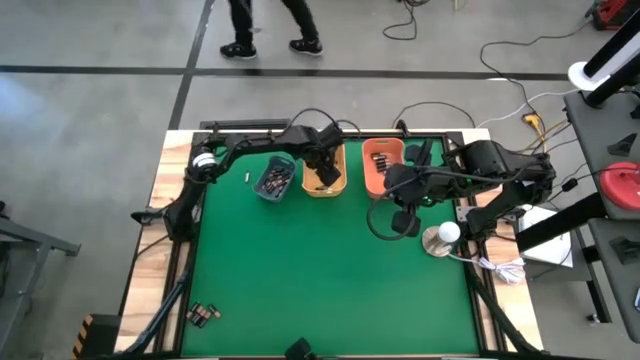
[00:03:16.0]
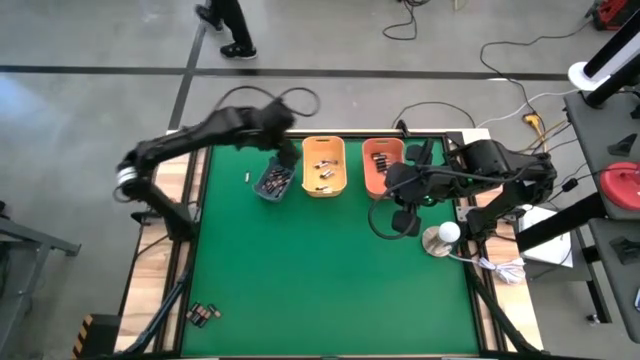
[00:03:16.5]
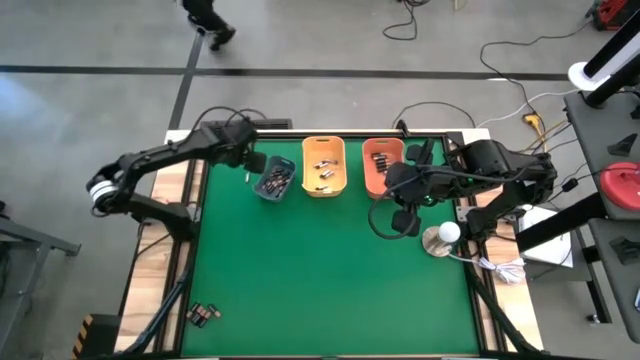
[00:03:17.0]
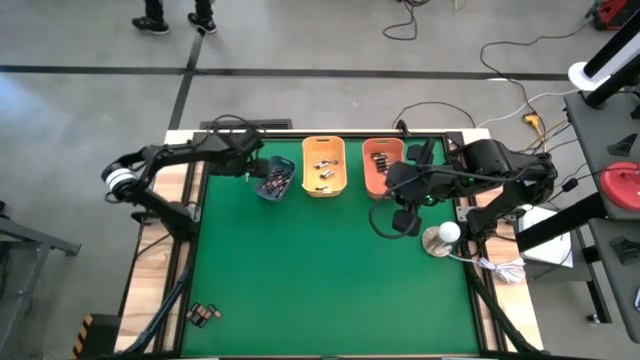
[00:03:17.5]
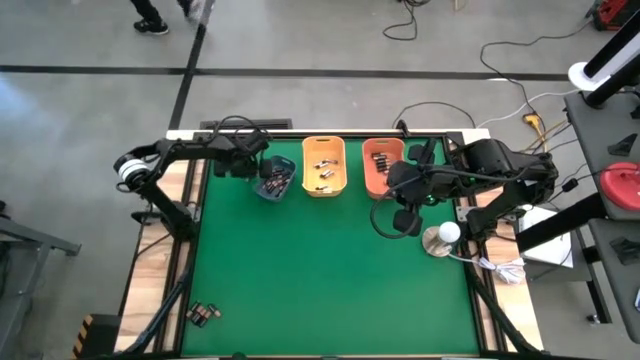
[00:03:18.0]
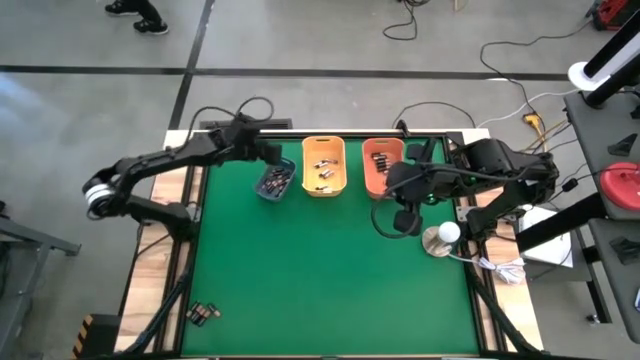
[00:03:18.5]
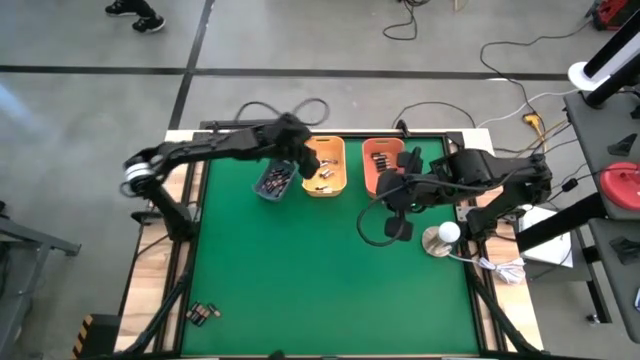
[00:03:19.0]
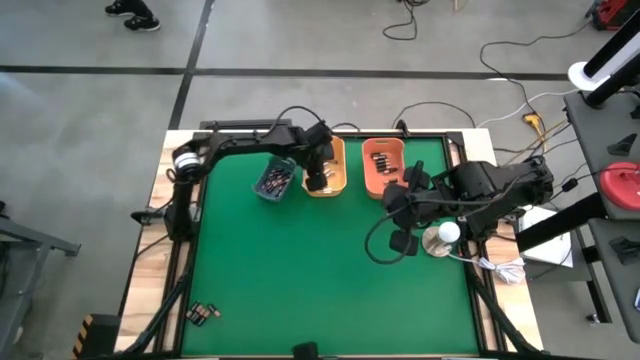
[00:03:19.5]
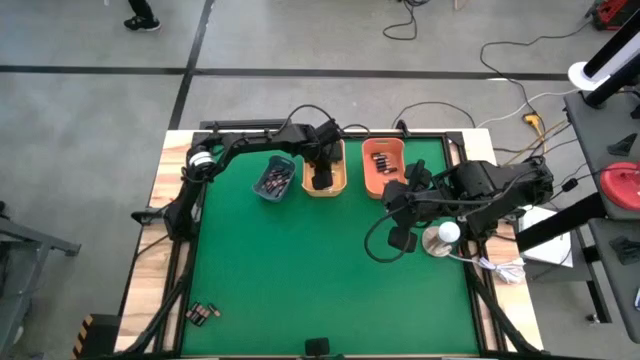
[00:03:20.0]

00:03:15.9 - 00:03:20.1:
Task: Sort batteries
Put the silver battery into the yellow bin

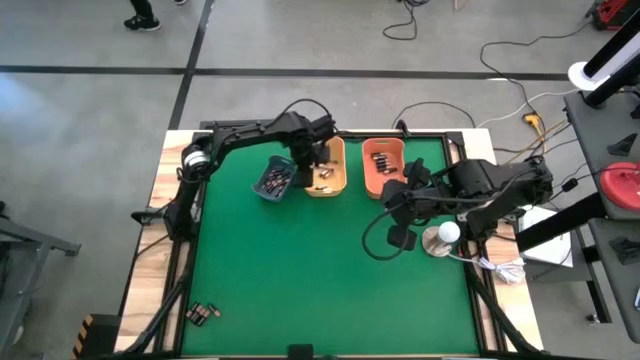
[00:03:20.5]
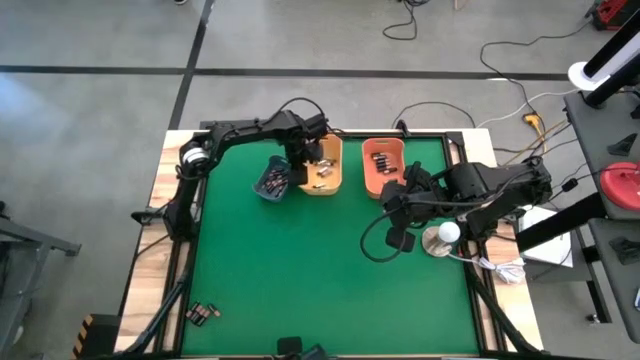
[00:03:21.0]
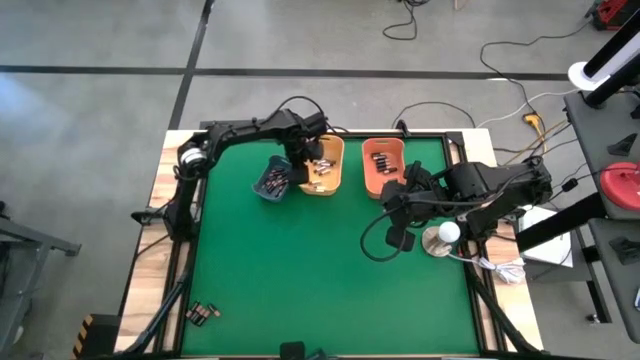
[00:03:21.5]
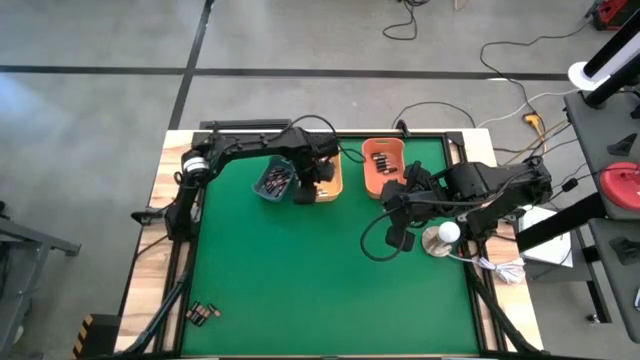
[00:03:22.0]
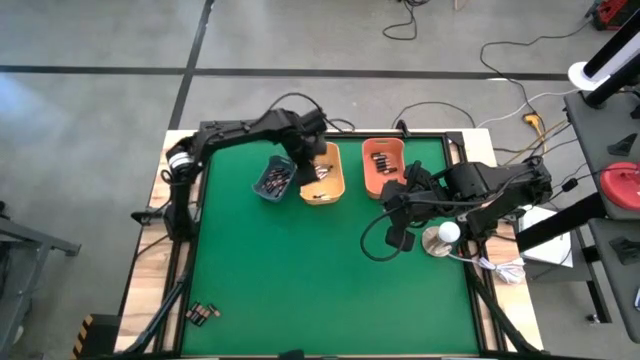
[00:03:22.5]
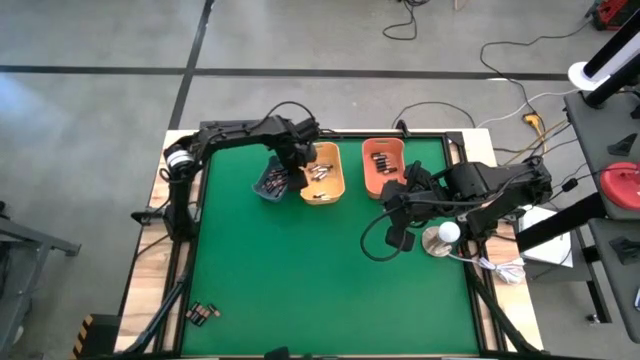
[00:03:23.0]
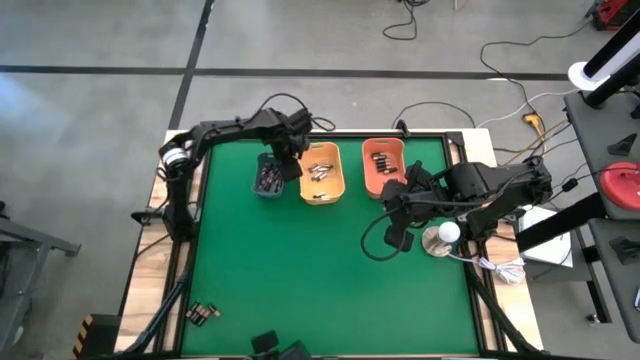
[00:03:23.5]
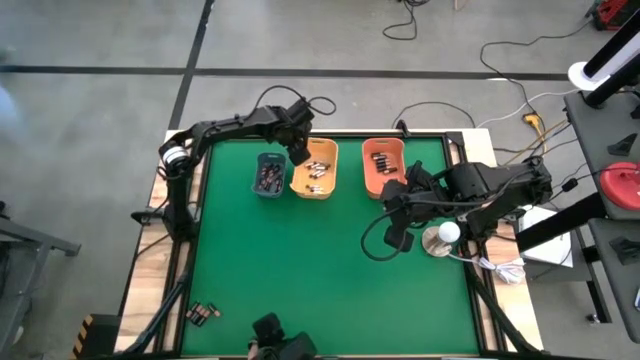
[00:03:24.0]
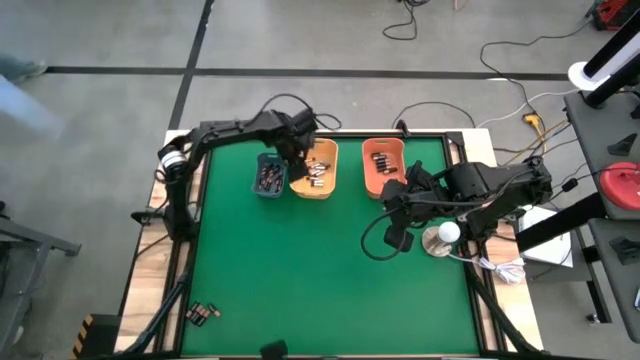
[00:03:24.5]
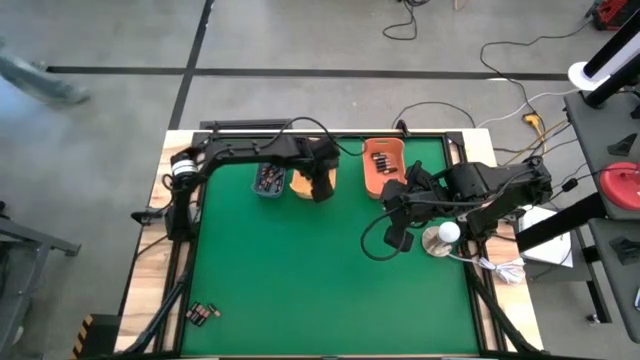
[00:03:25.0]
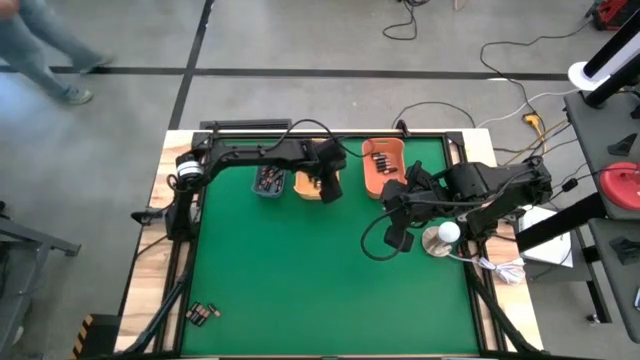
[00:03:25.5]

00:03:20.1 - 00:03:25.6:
Adjust the bin

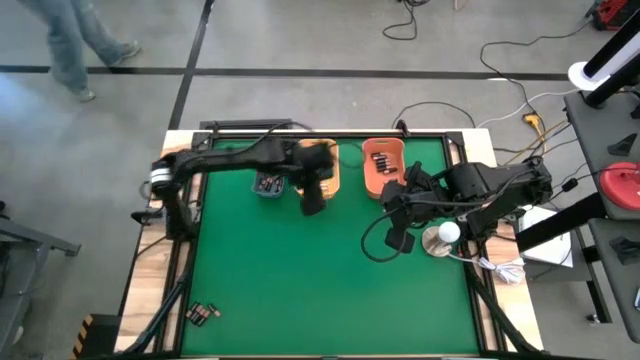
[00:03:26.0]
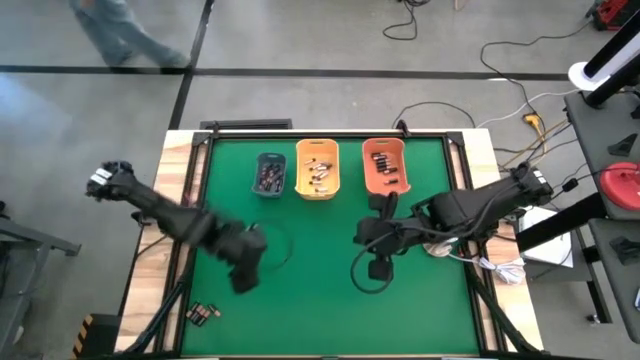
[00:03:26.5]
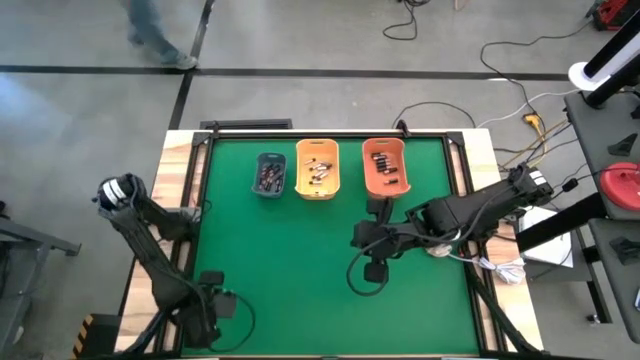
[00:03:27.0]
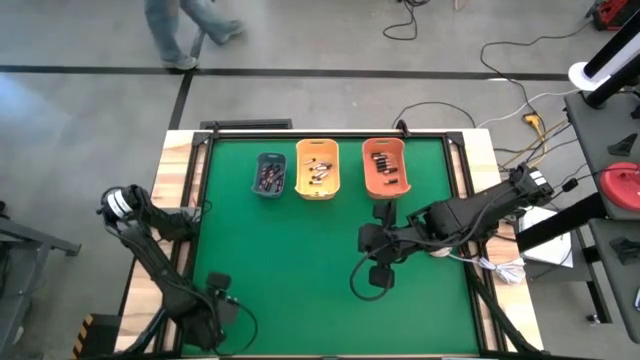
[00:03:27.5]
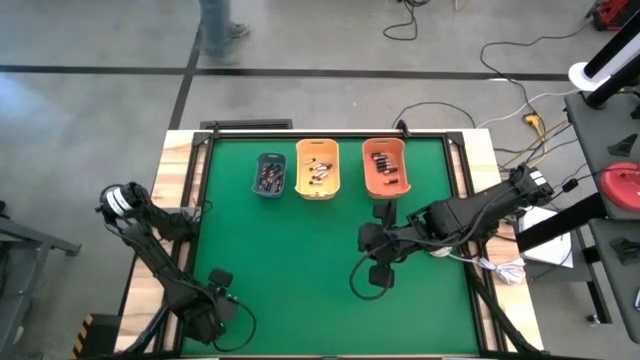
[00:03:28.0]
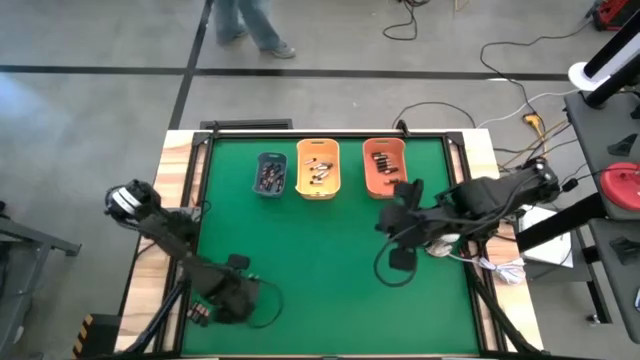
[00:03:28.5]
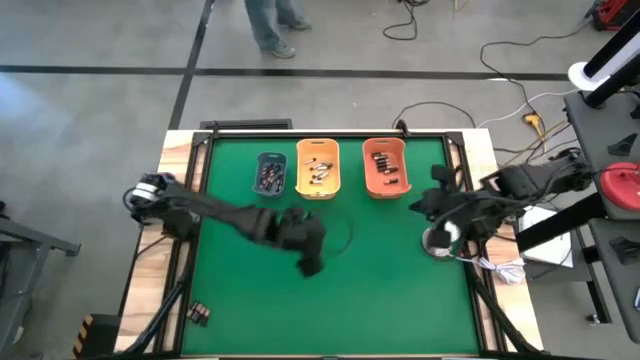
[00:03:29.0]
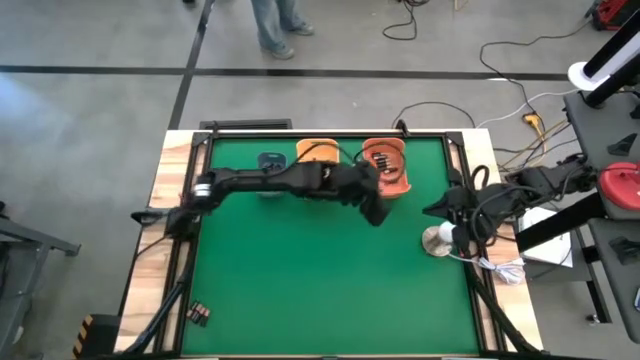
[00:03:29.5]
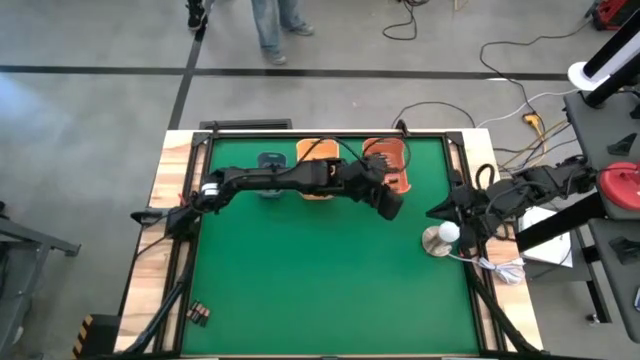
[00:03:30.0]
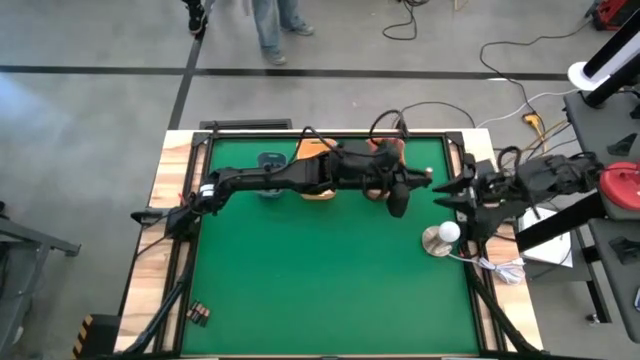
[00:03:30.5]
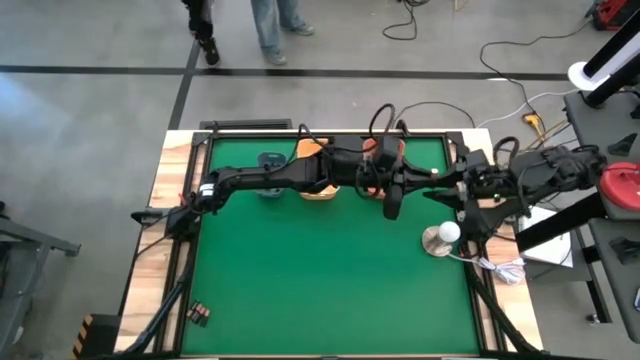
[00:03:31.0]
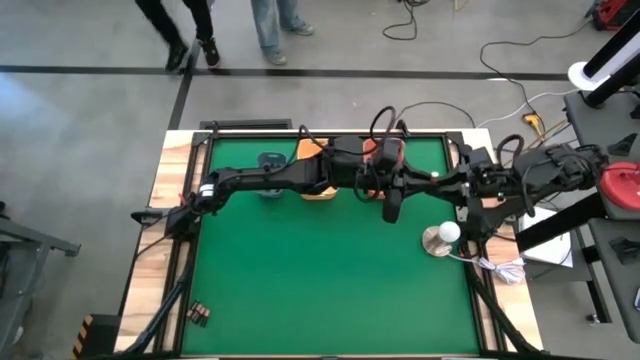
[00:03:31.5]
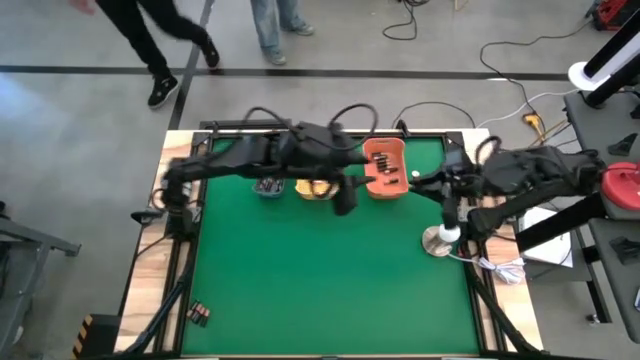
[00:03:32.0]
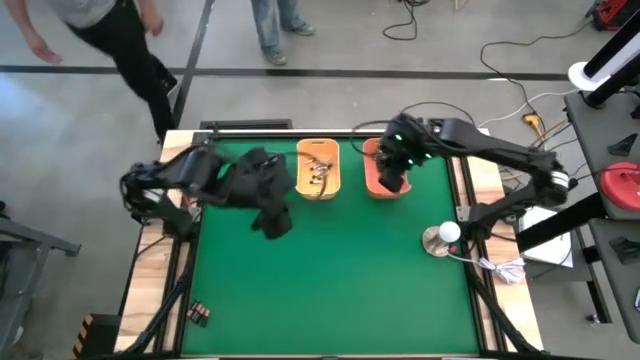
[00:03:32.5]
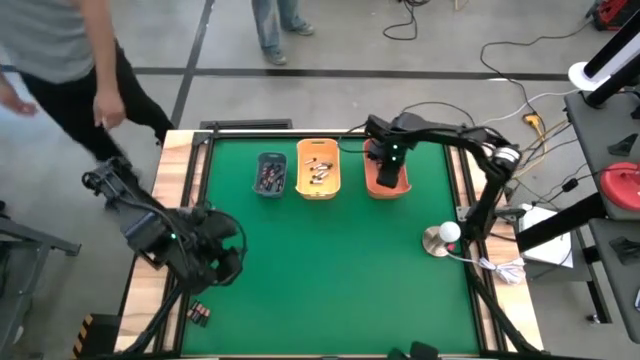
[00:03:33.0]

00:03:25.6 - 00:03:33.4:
Put the black battery into the orange bin

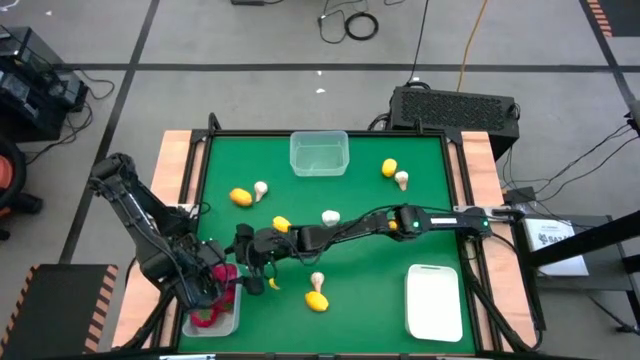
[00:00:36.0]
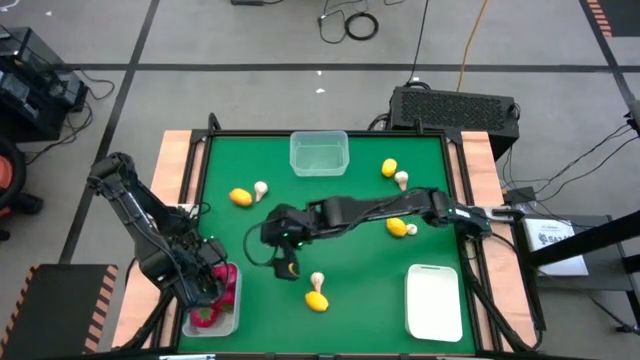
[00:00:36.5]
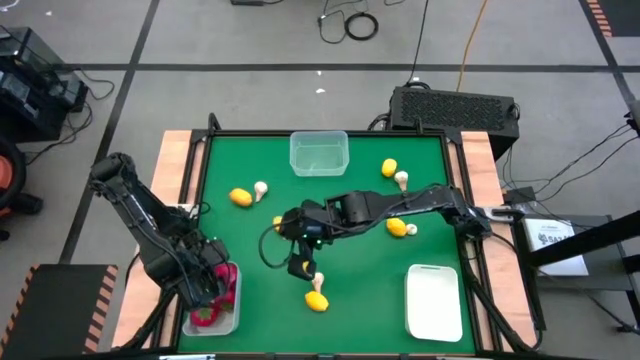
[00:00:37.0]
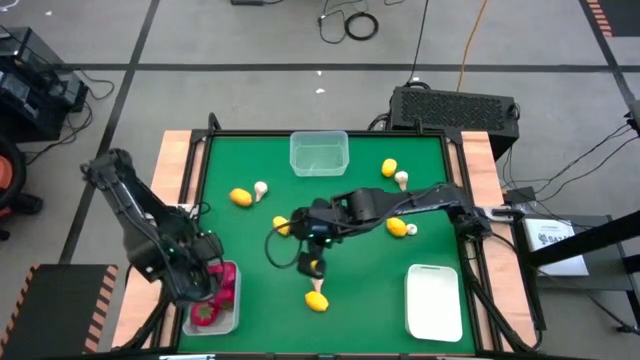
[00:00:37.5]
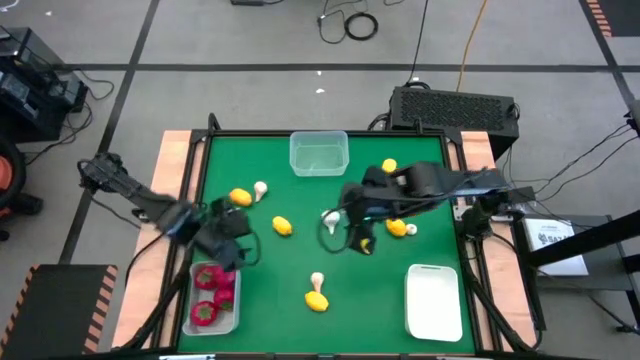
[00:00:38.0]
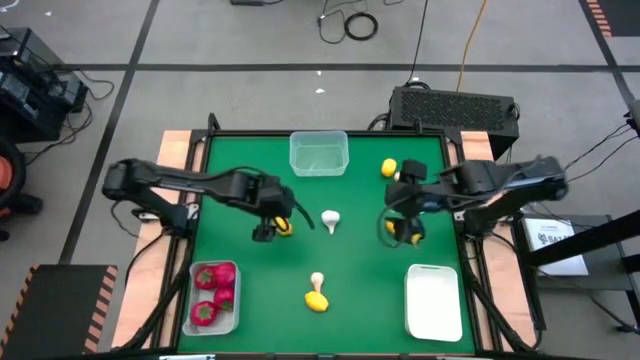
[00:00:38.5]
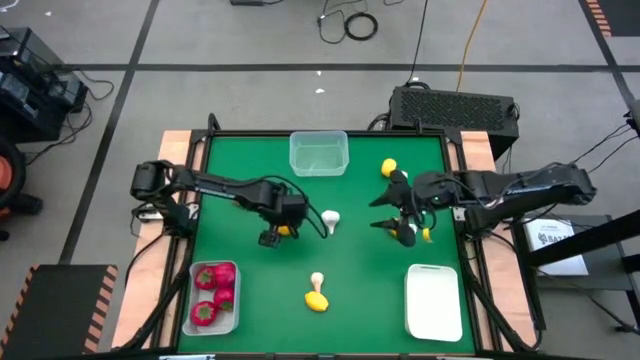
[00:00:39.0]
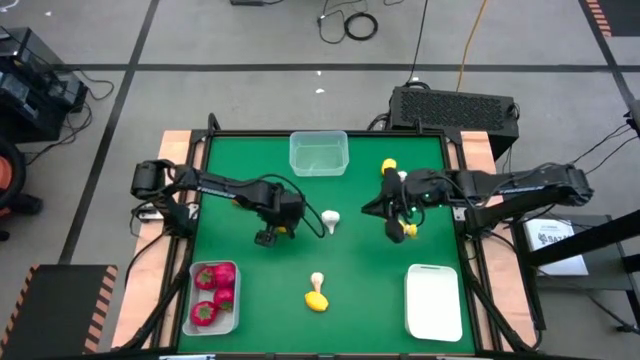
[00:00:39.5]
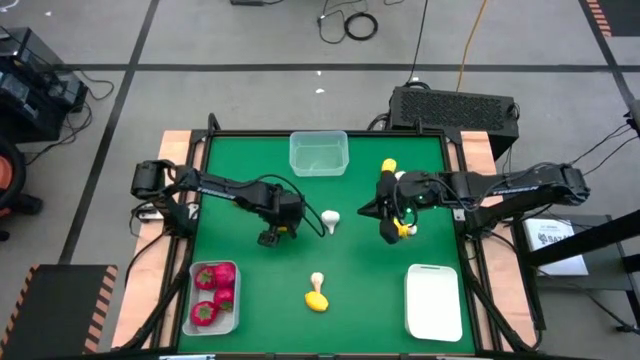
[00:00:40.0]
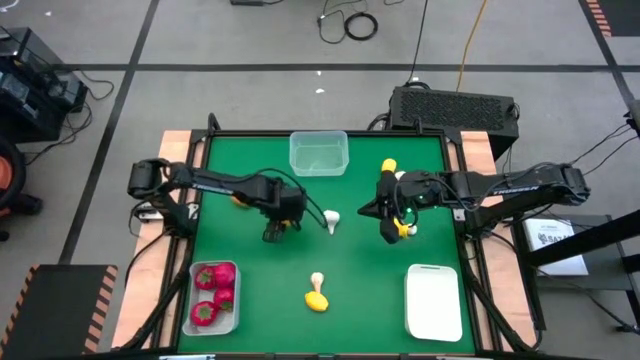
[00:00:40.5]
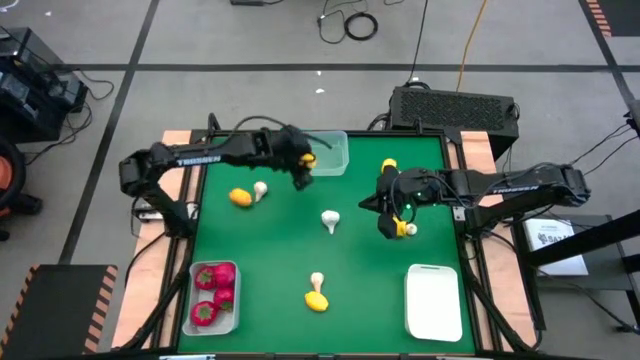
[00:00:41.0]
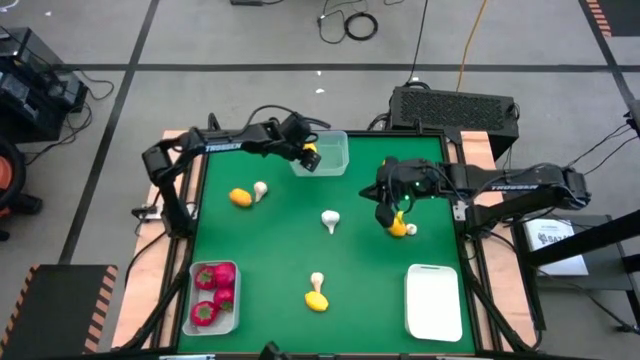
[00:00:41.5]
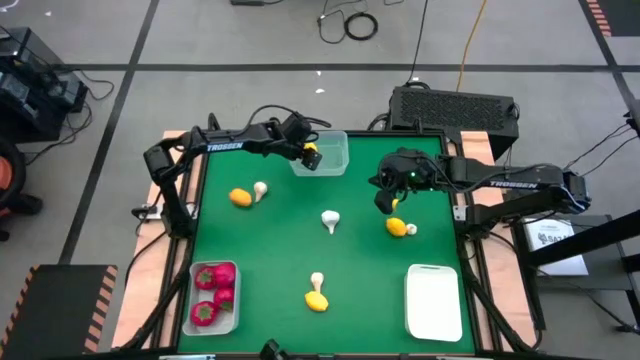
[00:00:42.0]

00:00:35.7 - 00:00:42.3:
Task: Sort produce into baskets
Put the lemon into the transparent bin
